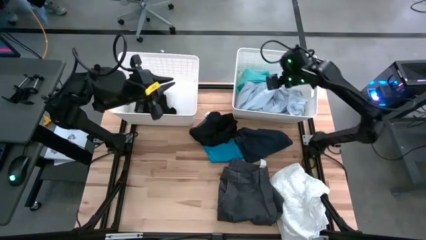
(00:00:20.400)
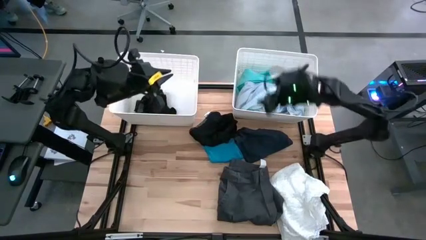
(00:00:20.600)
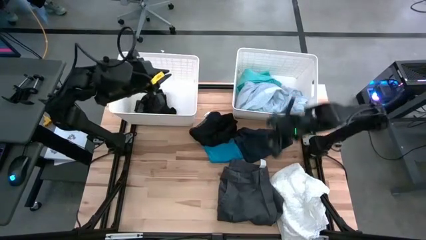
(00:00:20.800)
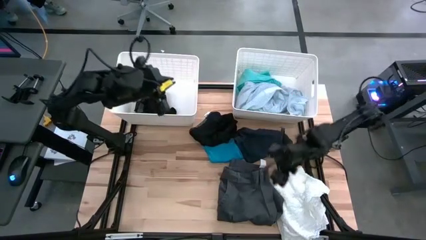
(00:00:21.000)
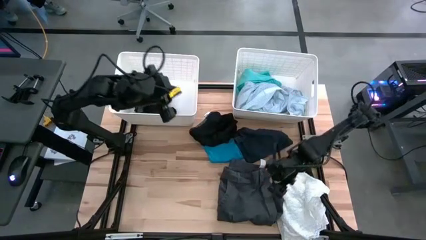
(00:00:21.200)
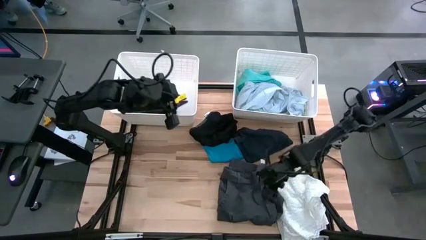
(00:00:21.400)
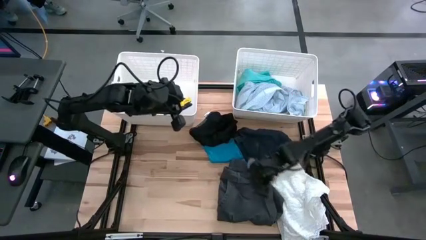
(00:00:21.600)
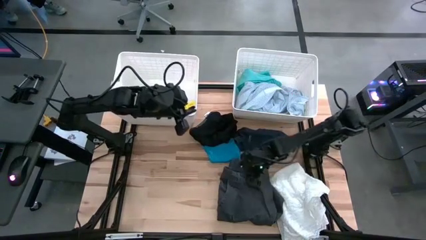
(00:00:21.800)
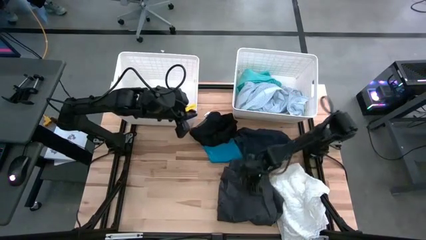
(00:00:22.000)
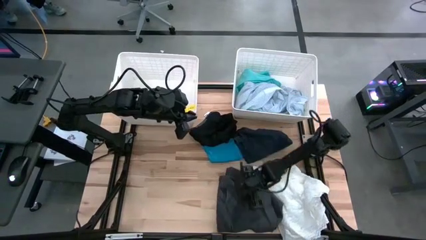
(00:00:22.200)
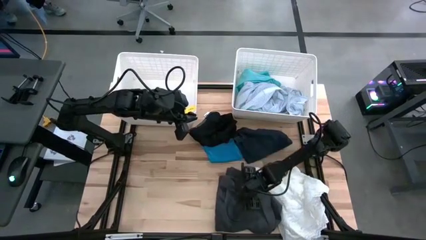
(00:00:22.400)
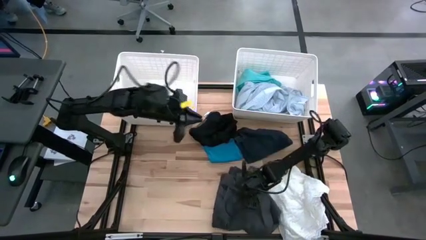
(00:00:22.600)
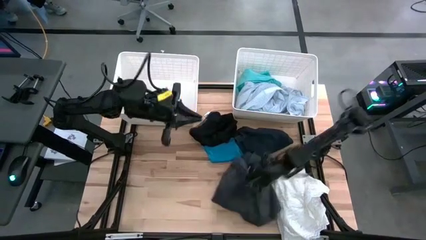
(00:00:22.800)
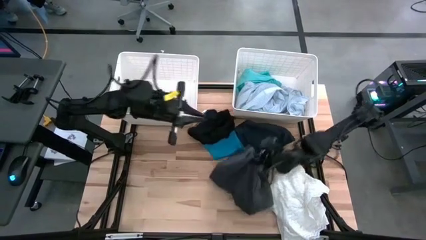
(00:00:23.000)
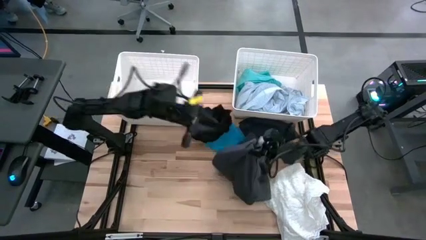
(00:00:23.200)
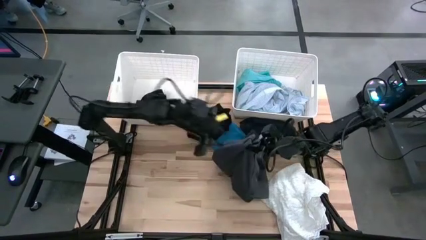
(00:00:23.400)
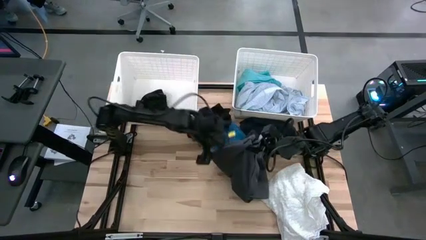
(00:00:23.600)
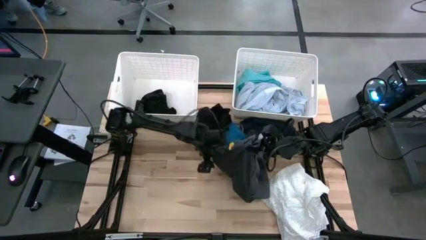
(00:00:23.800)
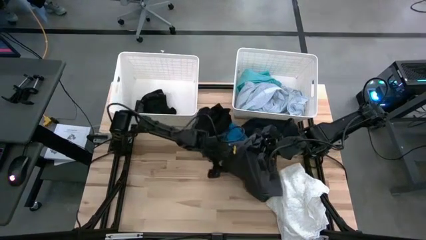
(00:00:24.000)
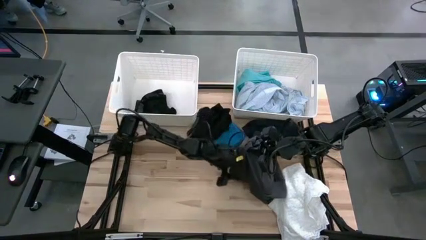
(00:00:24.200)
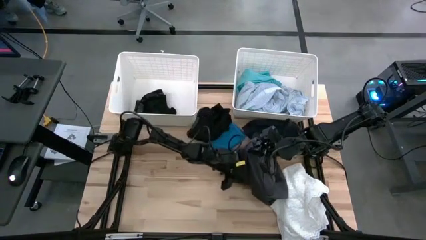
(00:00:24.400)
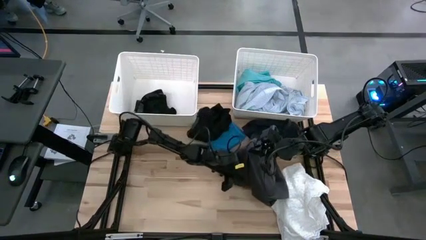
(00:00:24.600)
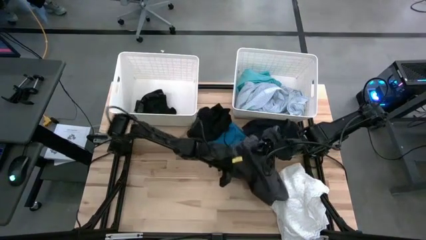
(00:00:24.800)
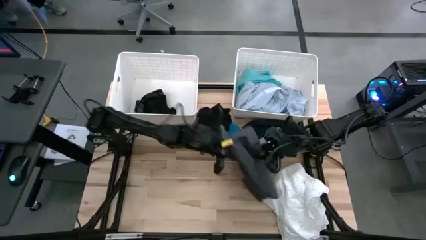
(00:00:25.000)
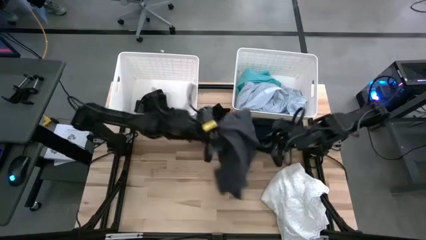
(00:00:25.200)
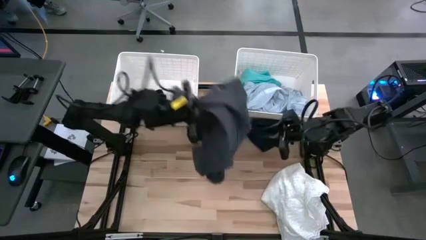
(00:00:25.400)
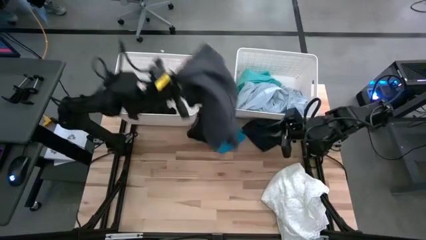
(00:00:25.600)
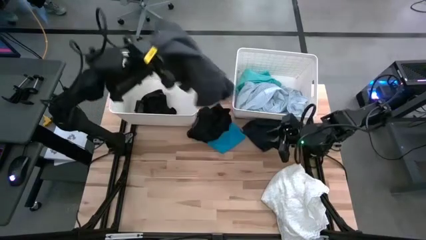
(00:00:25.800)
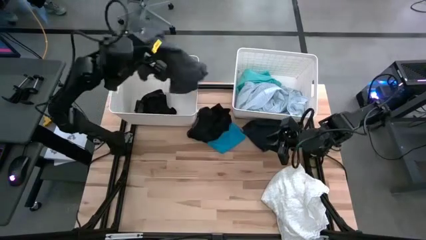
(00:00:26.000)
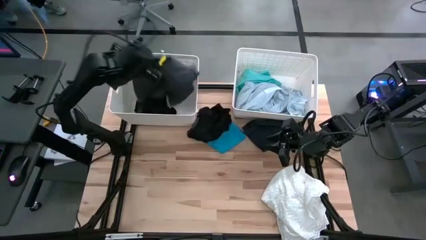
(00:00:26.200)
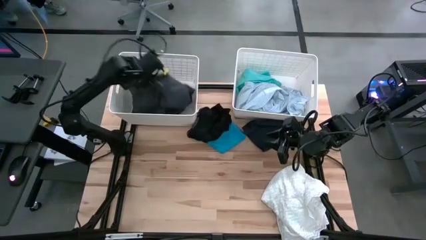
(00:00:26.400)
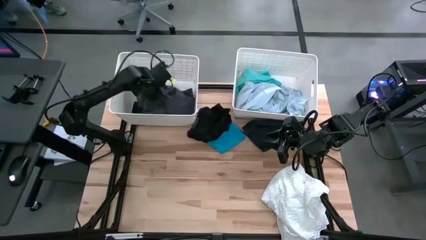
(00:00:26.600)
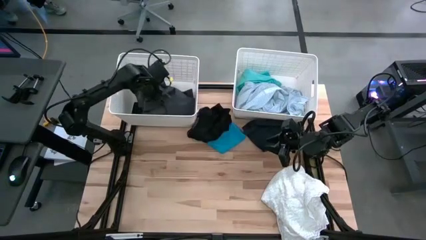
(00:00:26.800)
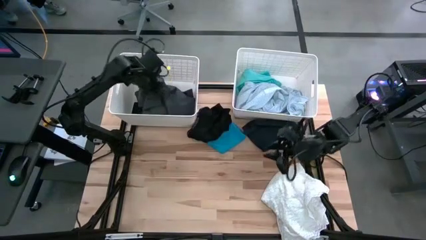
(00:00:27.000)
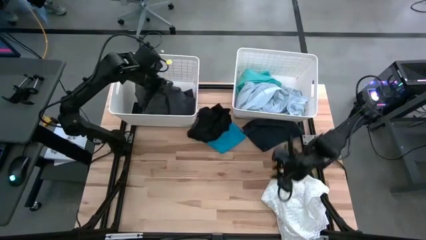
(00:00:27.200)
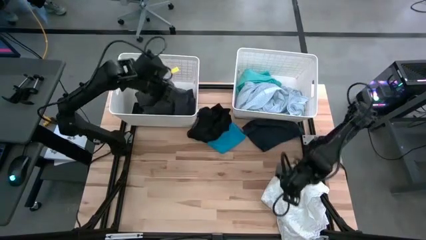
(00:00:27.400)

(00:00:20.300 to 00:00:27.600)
Task: Sort clothes
Put the black short into the left laundry bin

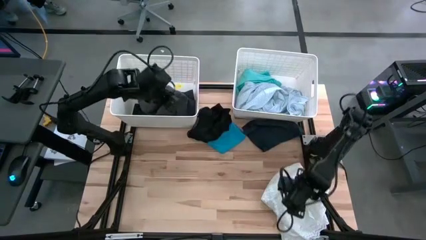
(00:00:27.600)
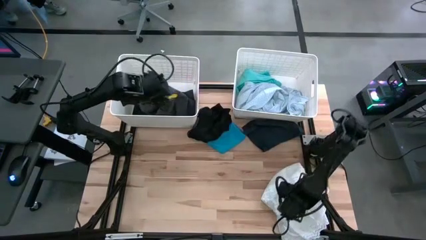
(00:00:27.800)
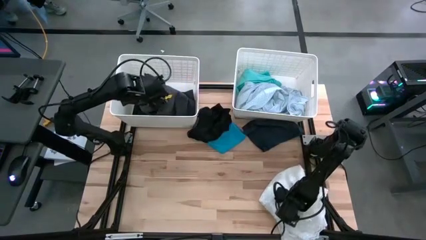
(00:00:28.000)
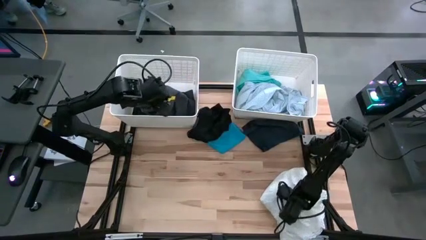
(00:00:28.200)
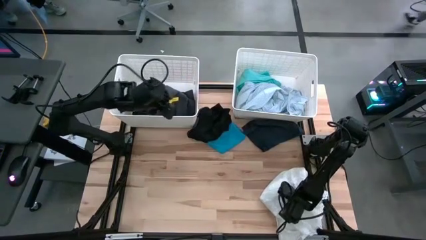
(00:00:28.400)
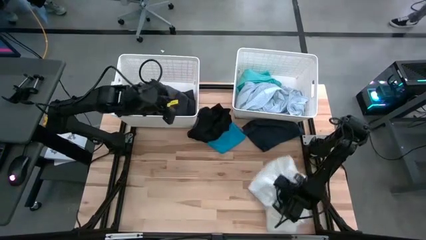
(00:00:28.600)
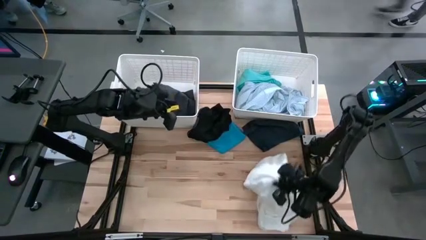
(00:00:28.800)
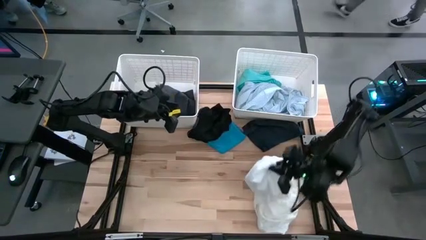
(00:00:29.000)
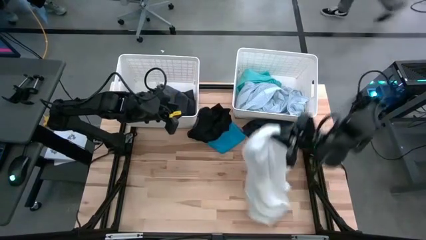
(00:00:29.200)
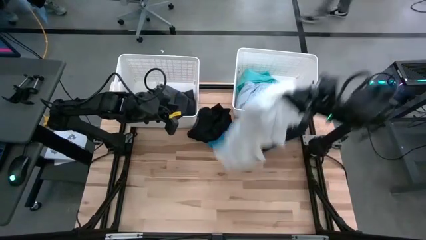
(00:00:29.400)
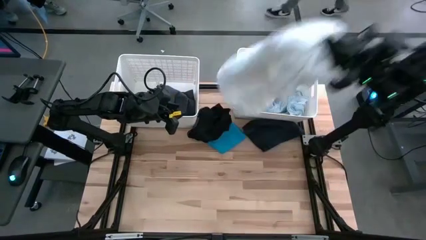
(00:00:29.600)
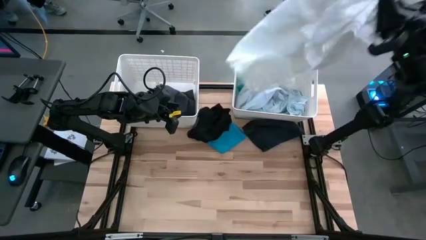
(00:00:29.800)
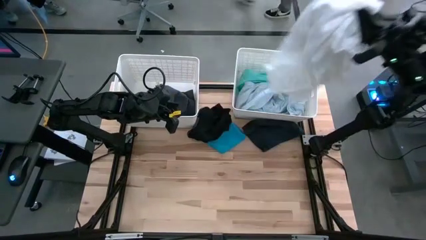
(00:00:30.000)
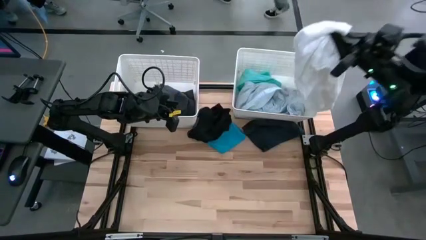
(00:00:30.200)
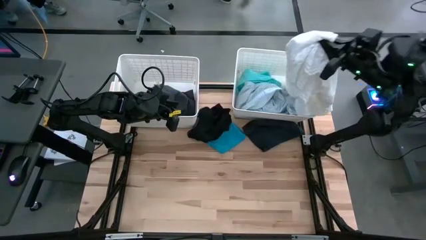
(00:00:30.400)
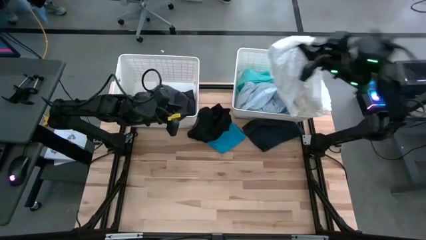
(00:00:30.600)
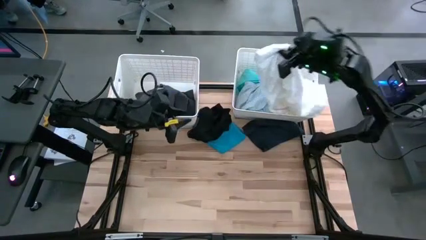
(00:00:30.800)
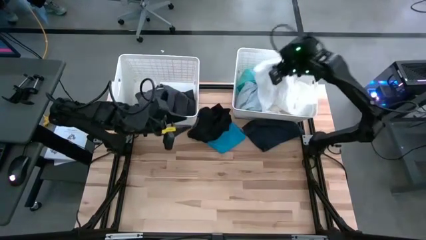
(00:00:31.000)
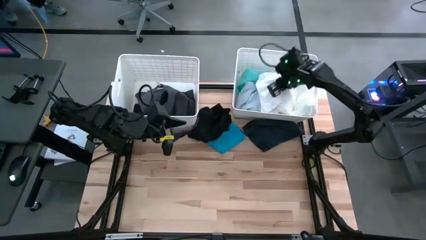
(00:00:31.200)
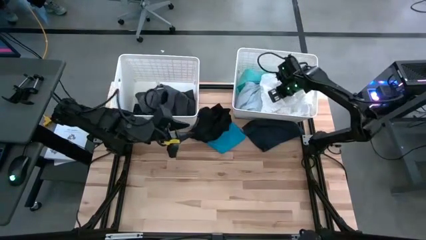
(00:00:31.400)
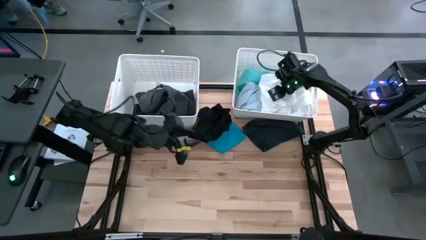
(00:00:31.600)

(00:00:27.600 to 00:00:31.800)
Put the white short into the right laundry bin

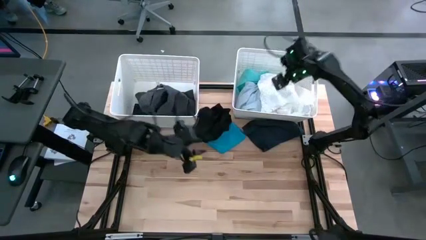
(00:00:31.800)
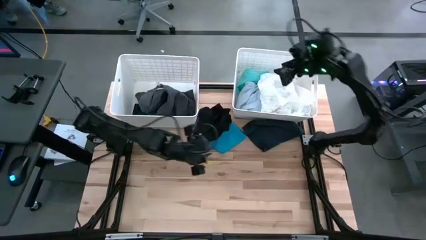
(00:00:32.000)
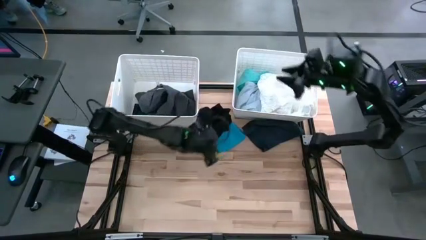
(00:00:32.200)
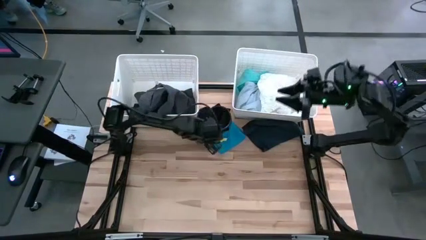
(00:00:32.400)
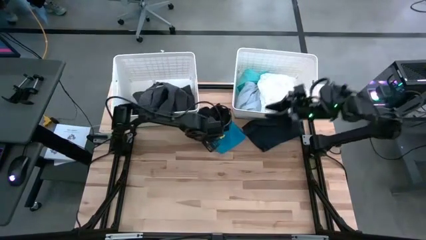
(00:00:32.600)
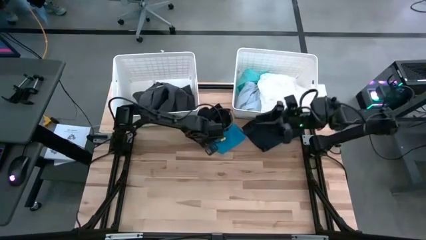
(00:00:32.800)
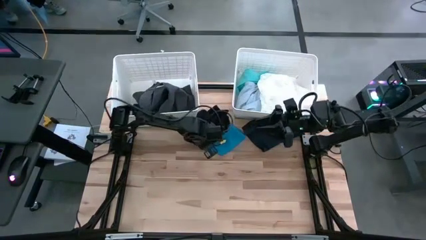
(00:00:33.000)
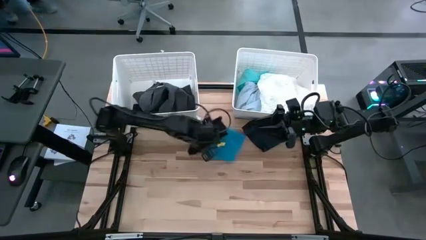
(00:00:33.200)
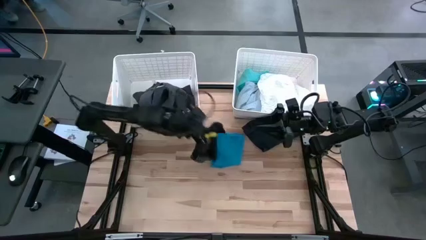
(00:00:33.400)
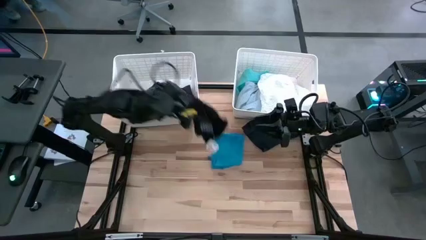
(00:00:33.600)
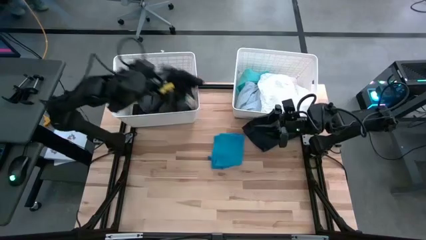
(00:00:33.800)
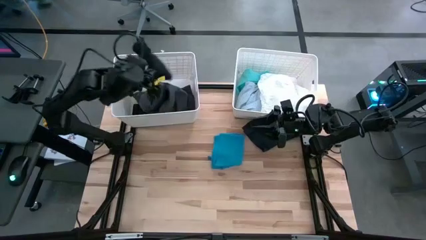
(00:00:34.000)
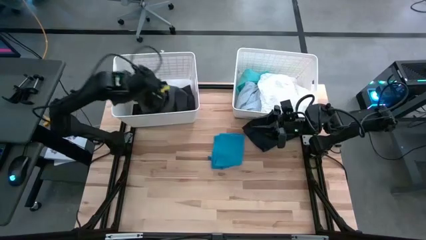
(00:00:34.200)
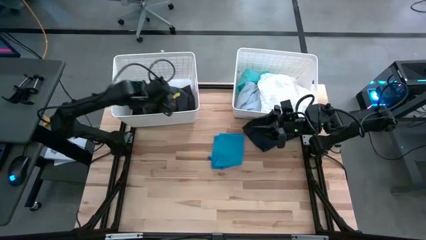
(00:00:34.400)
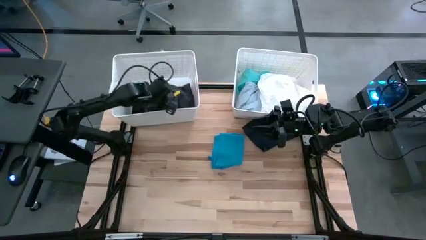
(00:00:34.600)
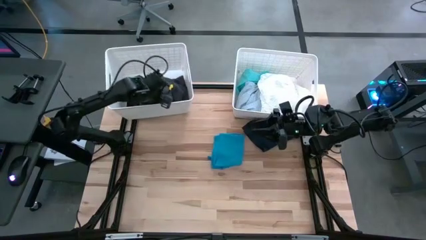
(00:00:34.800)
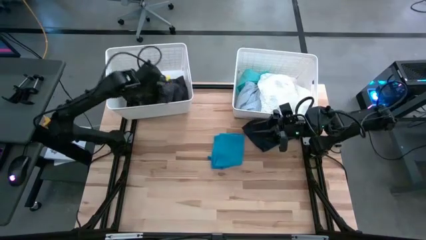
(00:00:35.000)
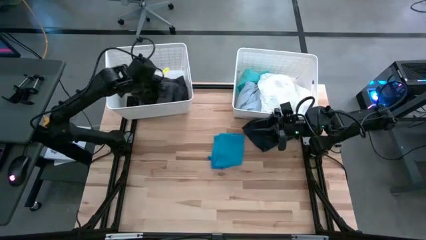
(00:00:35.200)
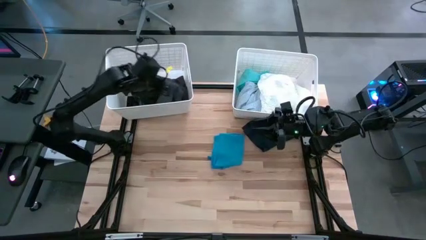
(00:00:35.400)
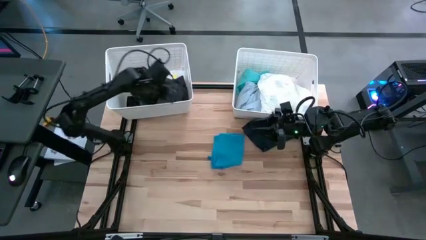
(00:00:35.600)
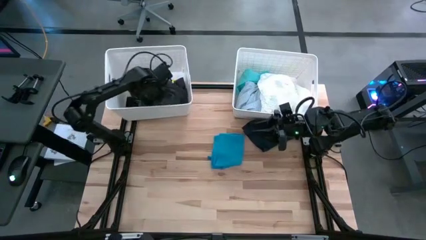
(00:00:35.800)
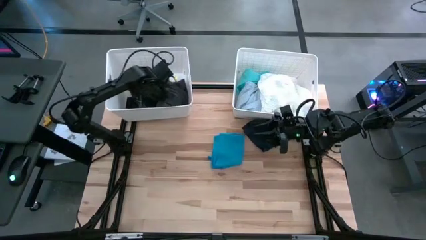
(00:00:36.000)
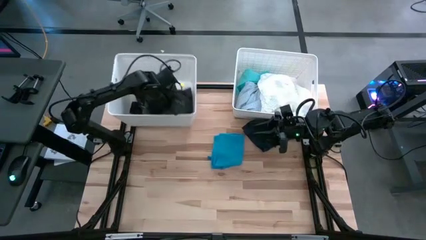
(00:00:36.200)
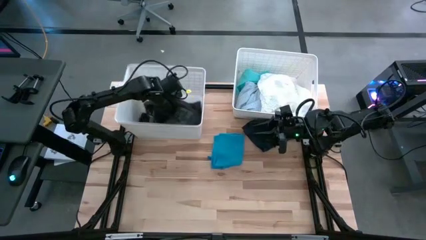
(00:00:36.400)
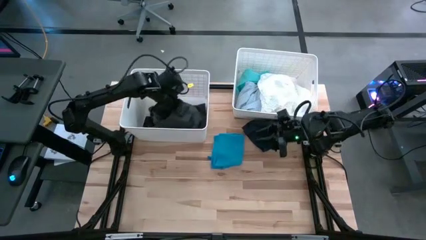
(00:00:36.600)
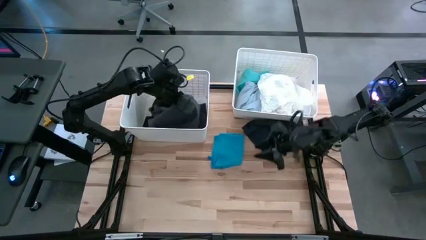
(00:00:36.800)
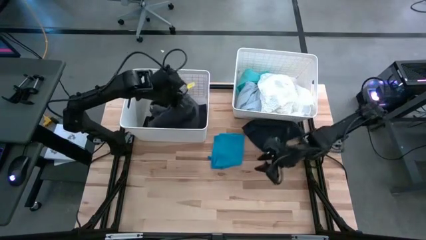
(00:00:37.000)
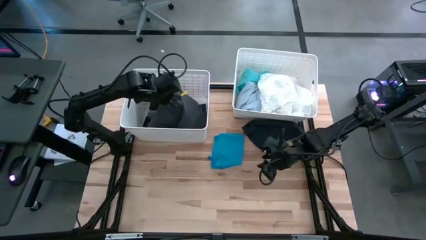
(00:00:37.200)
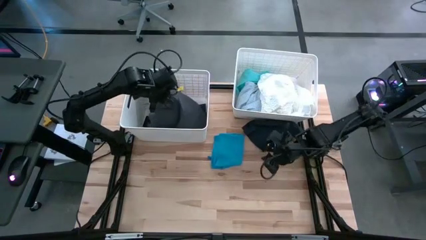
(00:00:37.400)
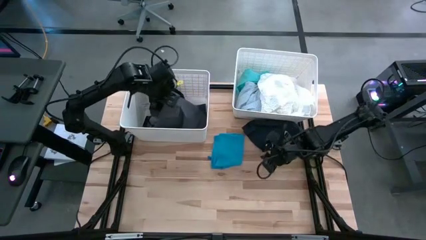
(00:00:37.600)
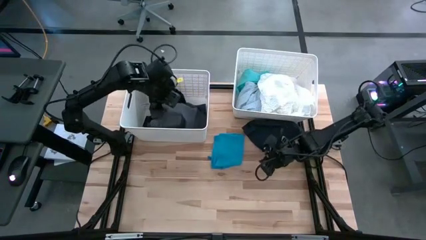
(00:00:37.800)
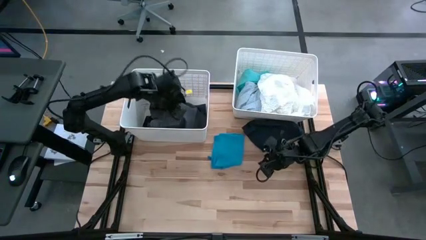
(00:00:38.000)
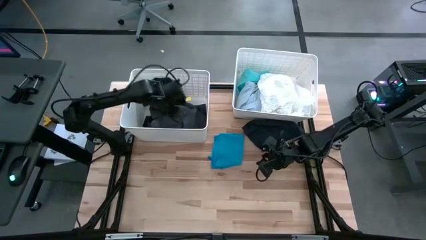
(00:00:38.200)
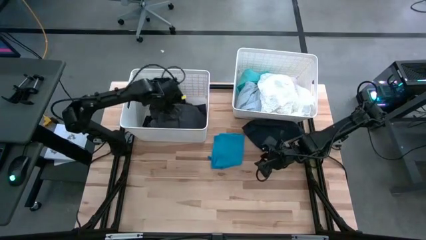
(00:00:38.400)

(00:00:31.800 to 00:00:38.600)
Put the black boxer into the left laundry bin
